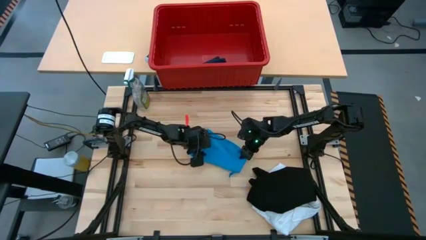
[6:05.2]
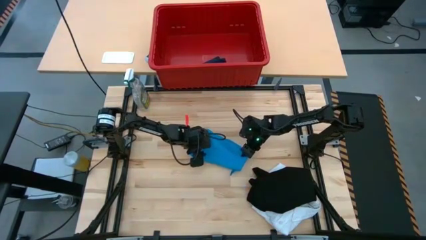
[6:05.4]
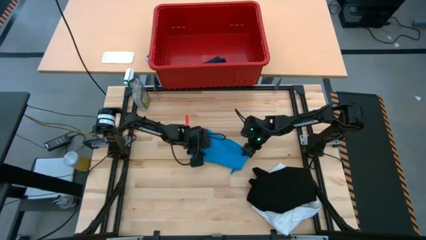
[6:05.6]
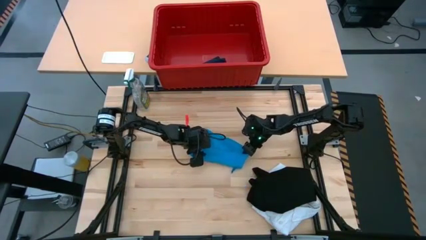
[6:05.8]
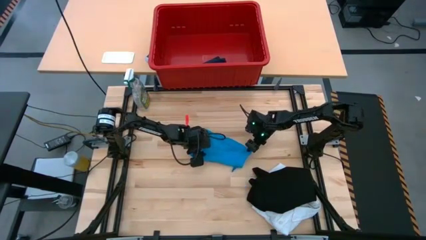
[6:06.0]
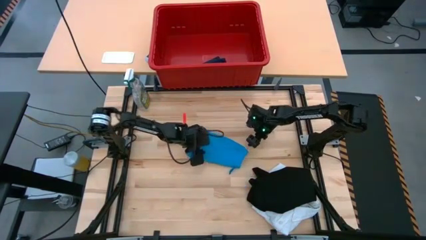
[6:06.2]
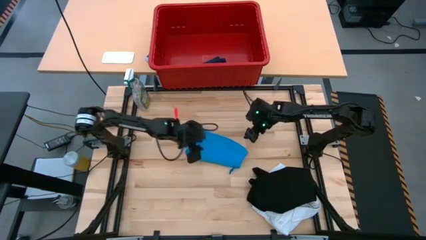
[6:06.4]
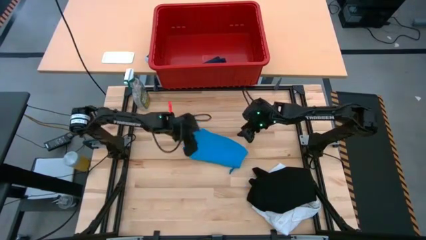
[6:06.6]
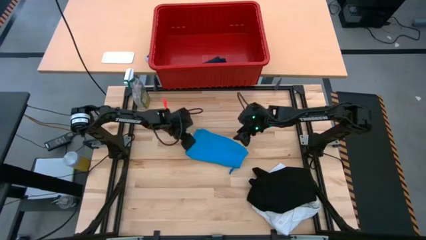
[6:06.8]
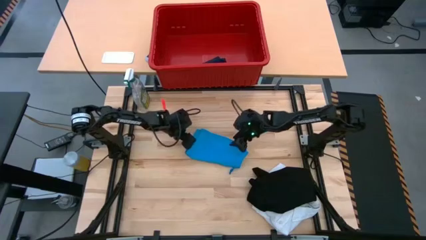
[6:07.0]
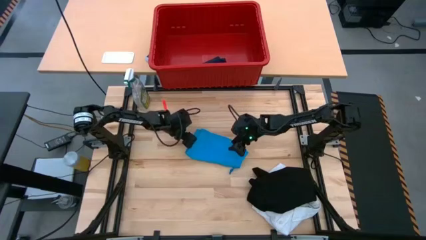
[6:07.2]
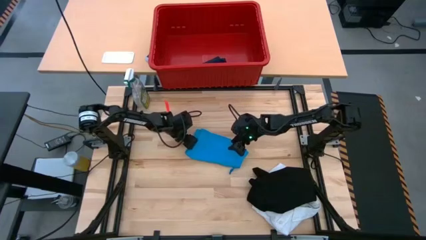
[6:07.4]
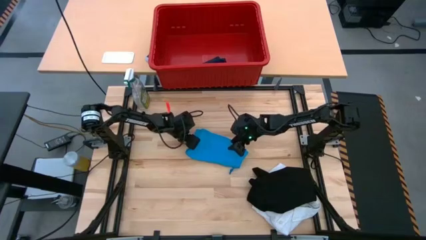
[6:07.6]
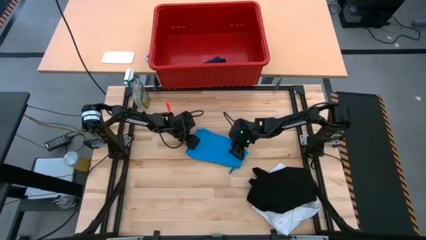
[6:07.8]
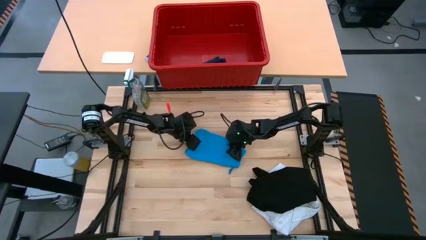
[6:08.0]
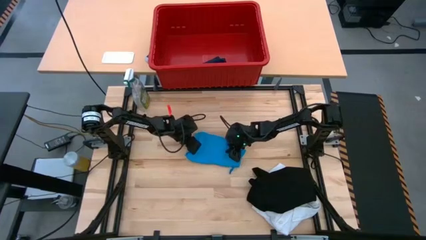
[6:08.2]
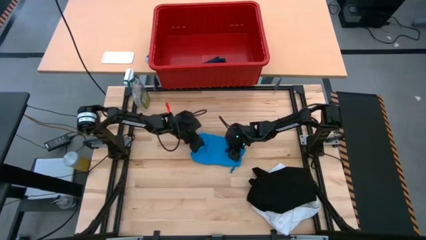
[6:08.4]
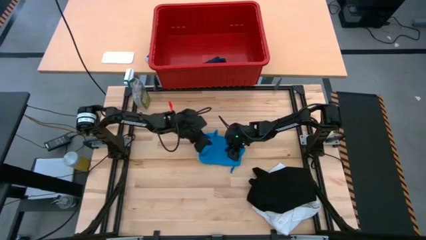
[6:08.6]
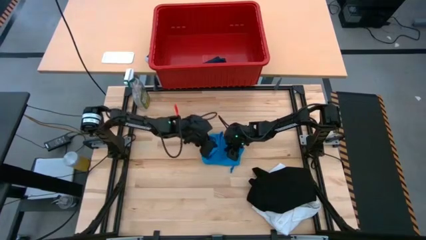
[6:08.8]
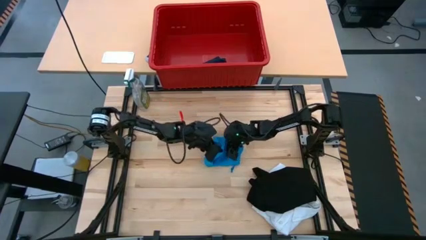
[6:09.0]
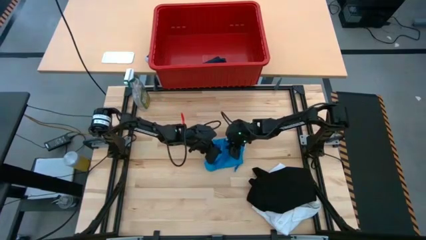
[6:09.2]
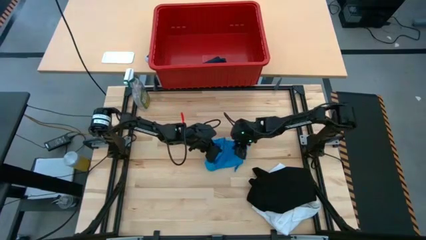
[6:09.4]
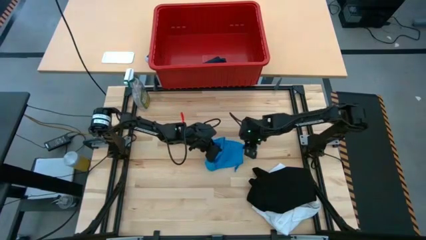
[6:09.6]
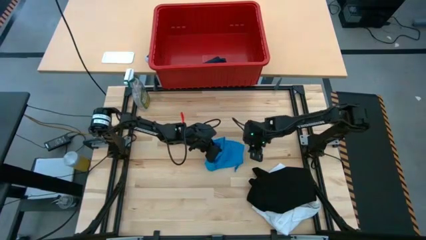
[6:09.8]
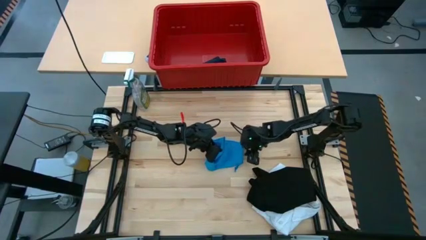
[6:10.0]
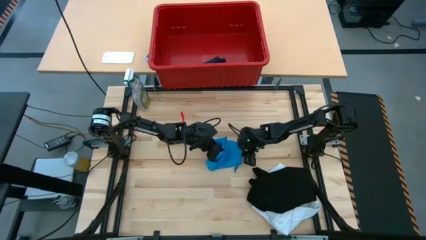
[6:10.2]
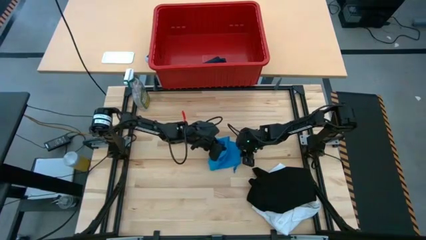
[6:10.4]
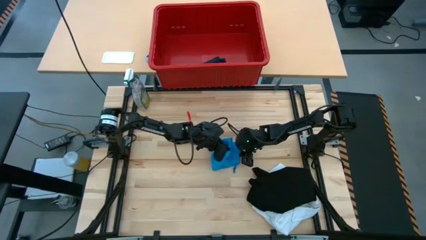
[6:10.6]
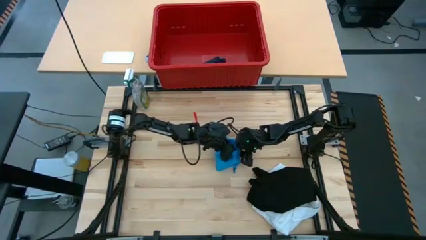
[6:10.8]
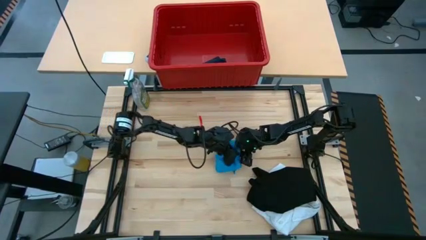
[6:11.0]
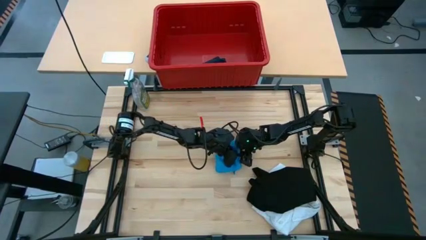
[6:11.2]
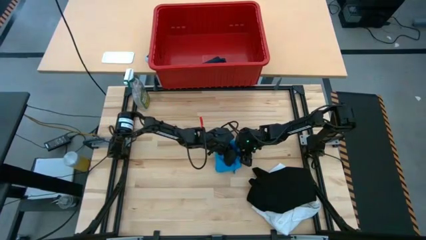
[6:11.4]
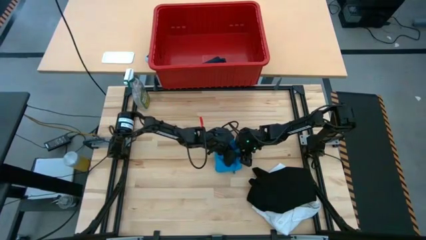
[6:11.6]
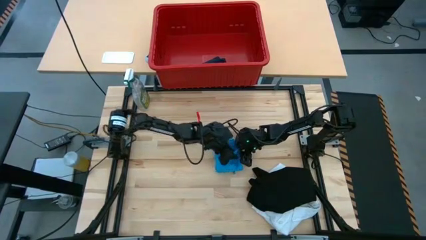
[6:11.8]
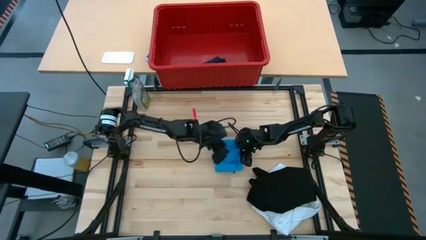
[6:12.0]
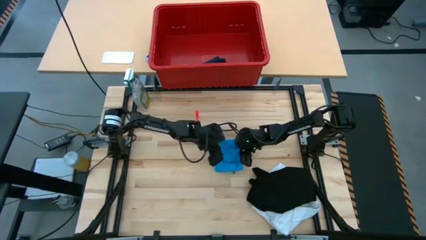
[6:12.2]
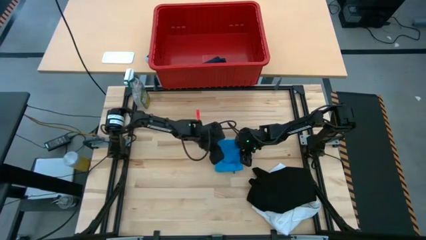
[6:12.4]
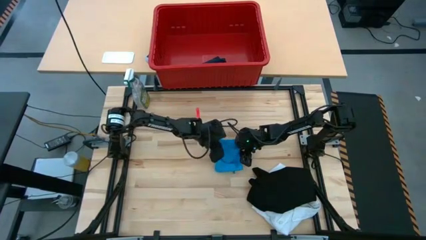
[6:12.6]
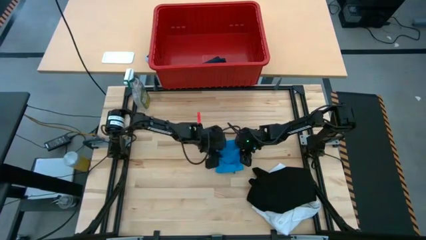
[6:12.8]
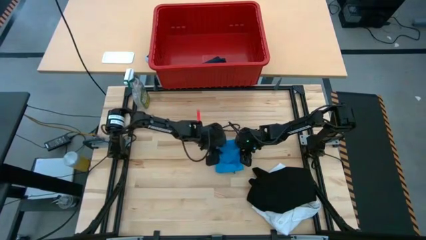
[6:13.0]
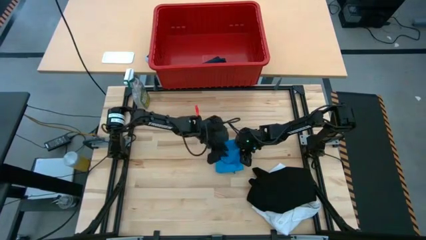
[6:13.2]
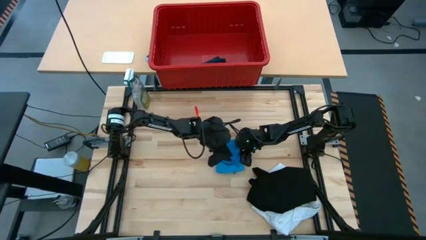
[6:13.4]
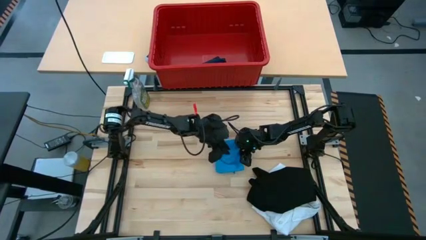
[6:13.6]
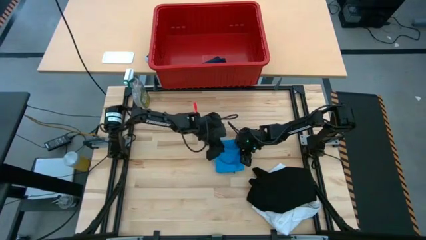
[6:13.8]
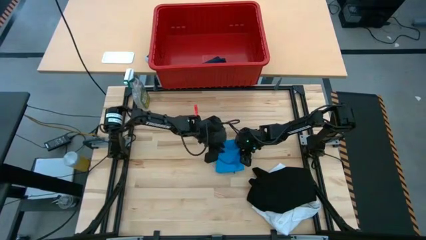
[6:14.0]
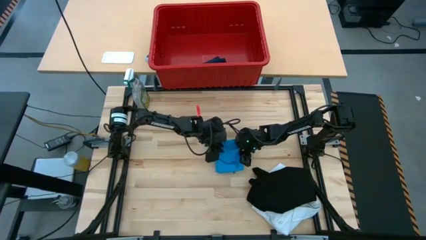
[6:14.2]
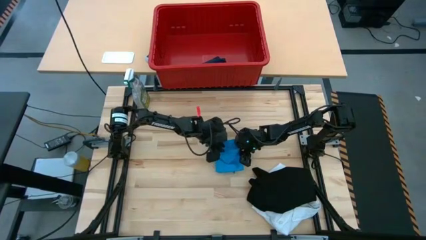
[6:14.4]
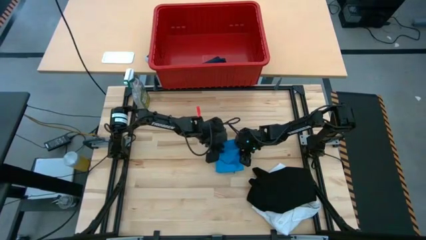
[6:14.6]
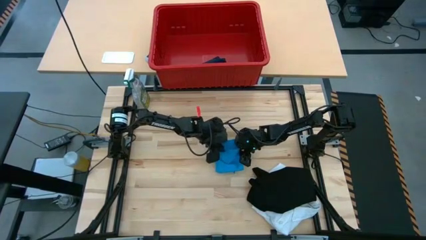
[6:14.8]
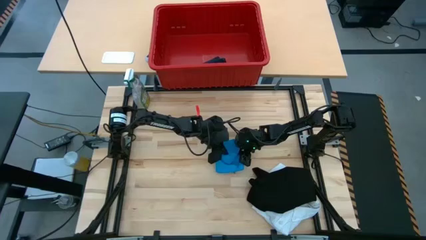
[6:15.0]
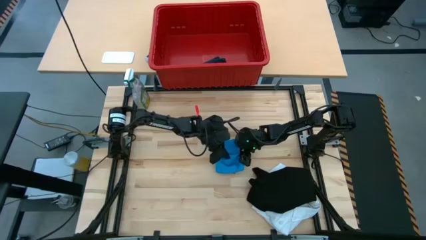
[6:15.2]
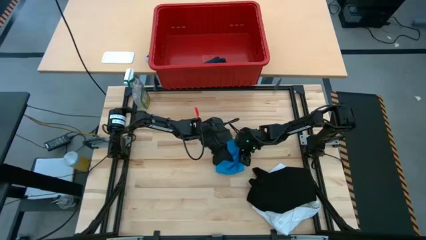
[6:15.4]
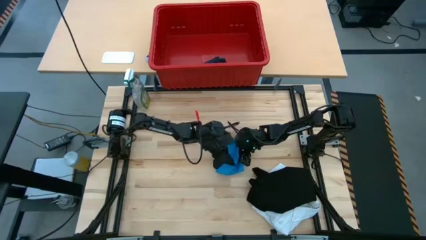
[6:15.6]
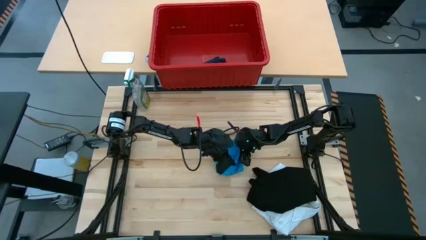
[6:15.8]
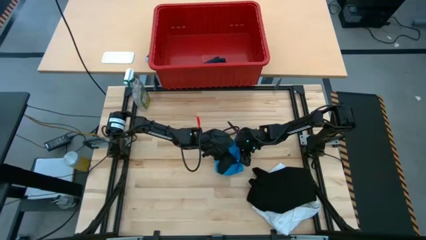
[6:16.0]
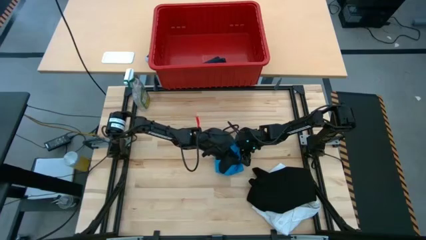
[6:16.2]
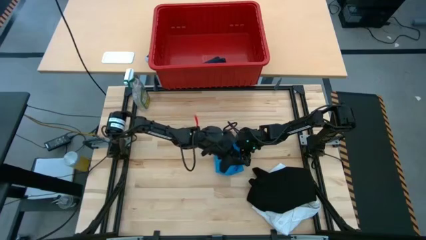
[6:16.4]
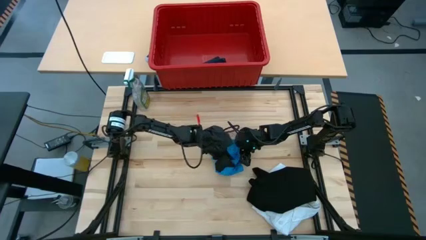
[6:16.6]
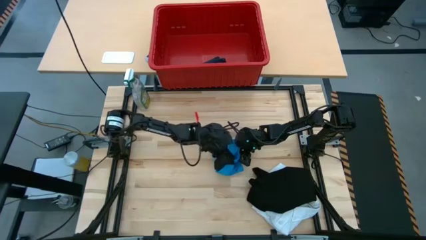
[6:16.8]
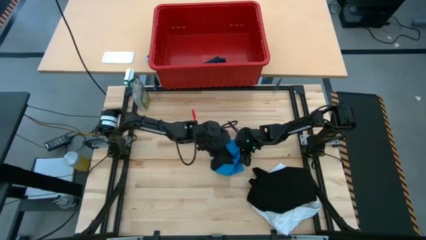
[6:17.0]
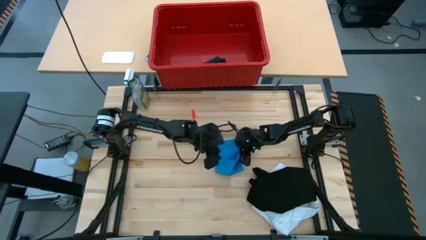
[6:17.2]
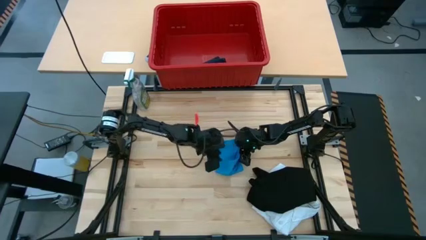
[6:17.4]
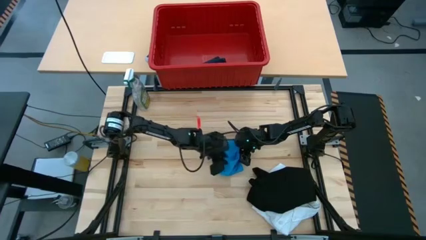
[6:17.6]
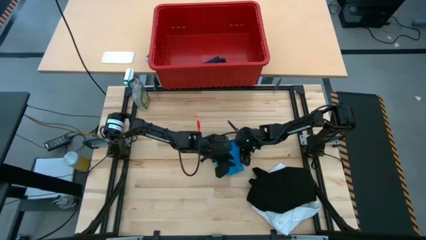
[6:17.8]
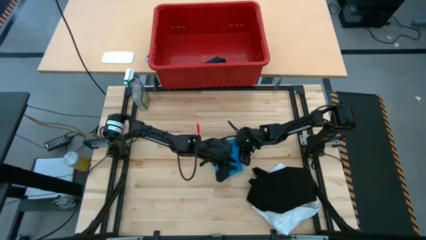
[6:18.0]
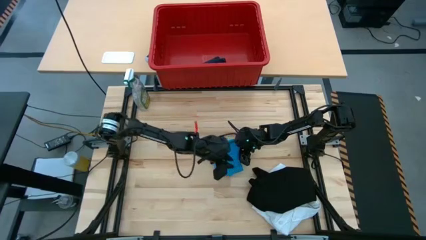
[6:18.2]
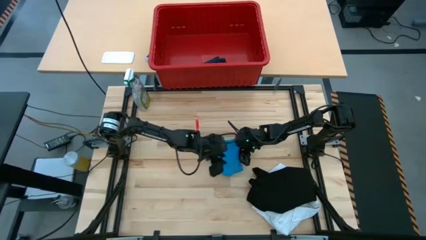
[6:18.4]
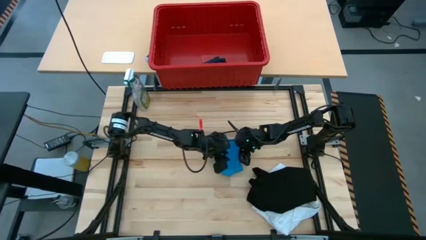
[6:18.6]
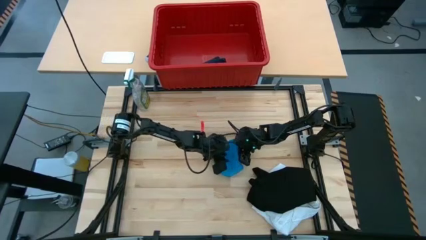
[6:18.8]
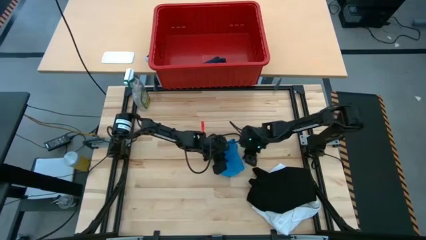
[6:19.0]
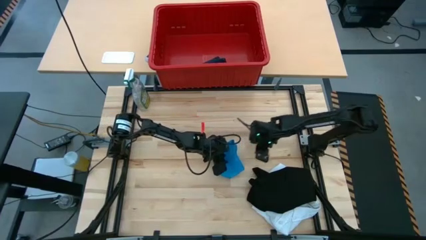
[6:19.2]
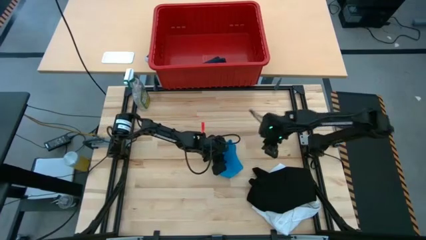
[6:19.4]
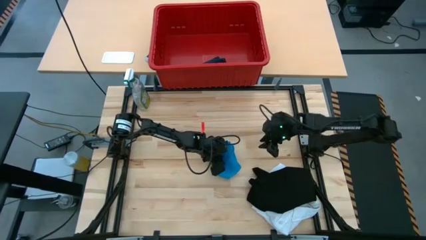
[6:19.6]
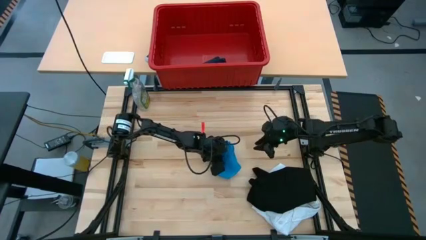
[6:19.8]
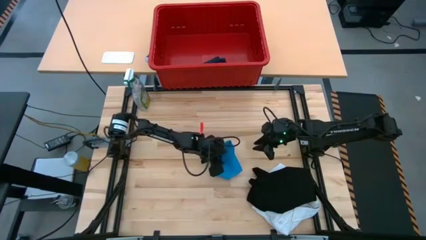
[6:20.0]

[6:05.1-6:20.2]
Task: Fold laundry
Fold the blue shorts
